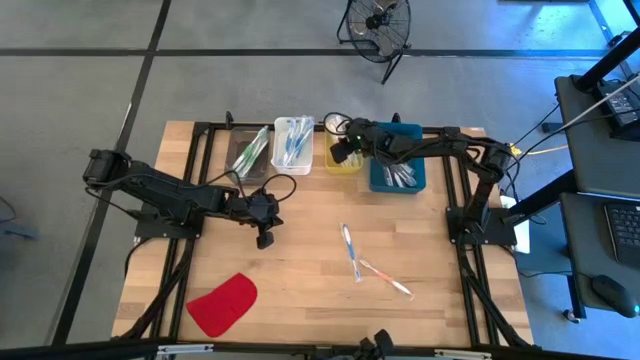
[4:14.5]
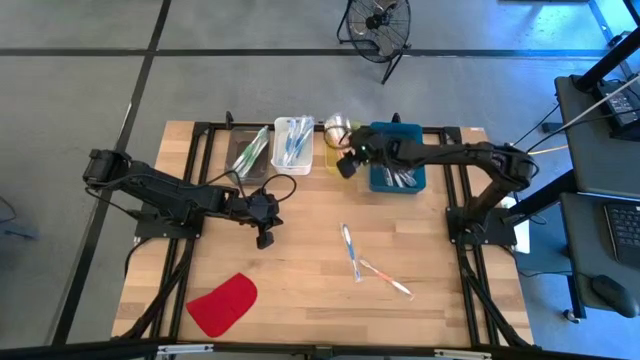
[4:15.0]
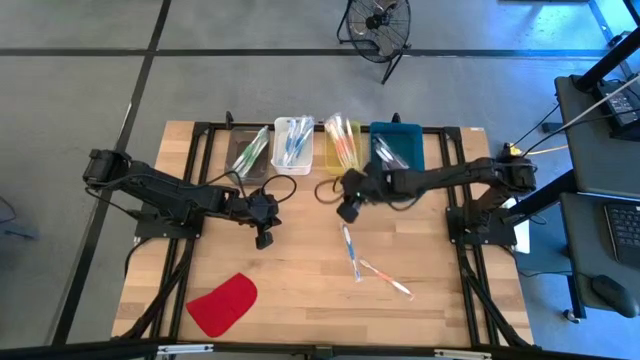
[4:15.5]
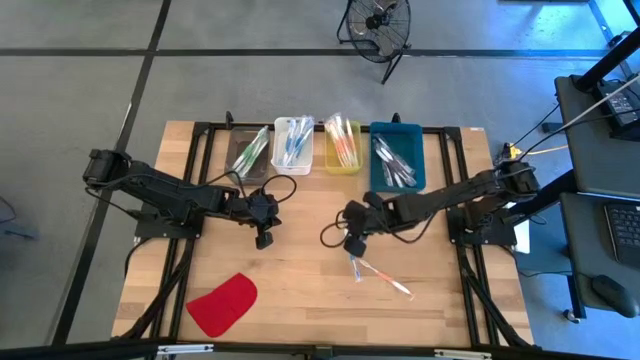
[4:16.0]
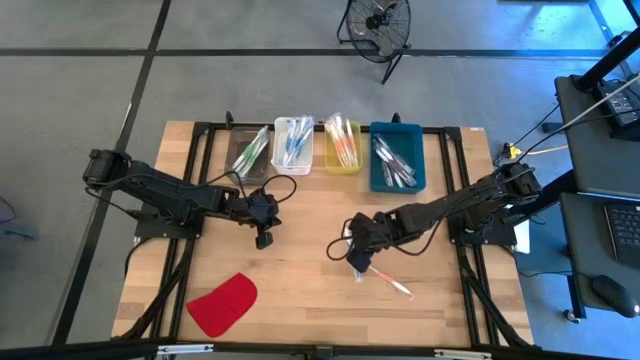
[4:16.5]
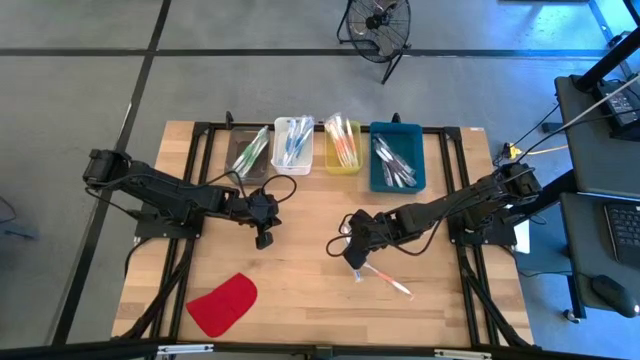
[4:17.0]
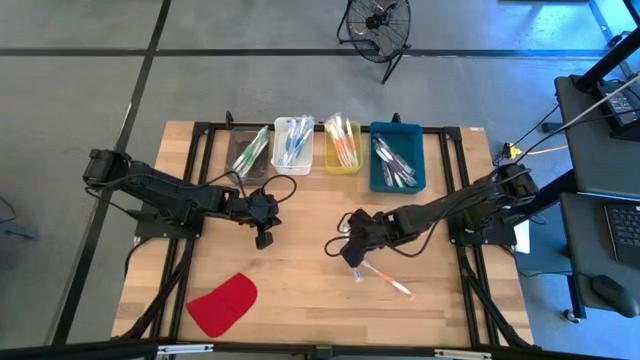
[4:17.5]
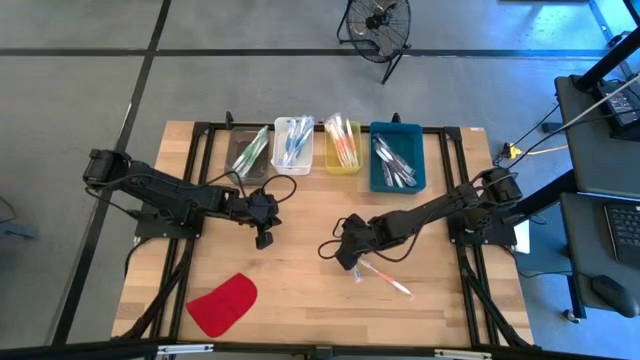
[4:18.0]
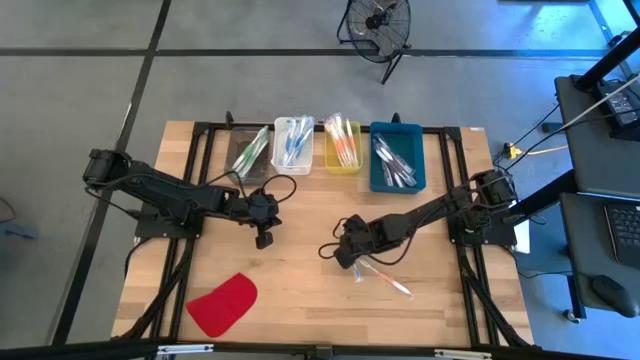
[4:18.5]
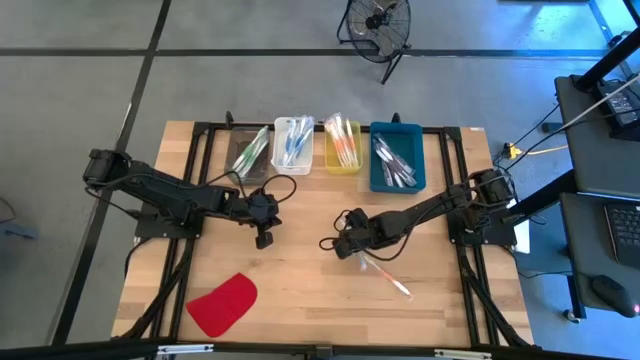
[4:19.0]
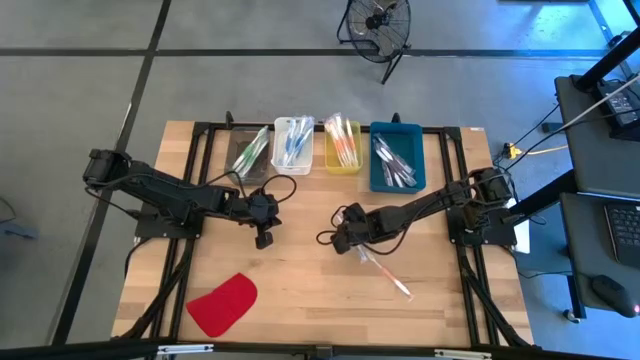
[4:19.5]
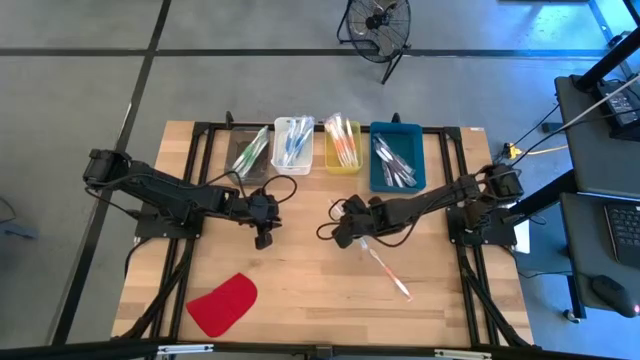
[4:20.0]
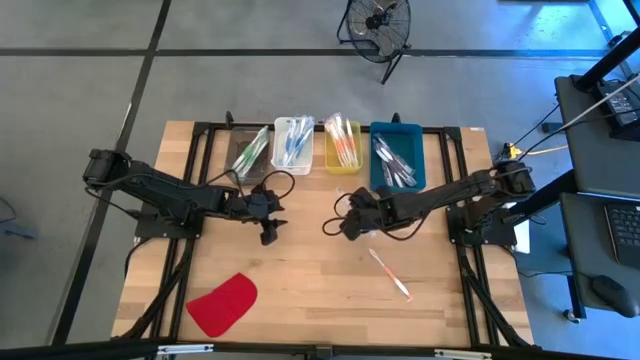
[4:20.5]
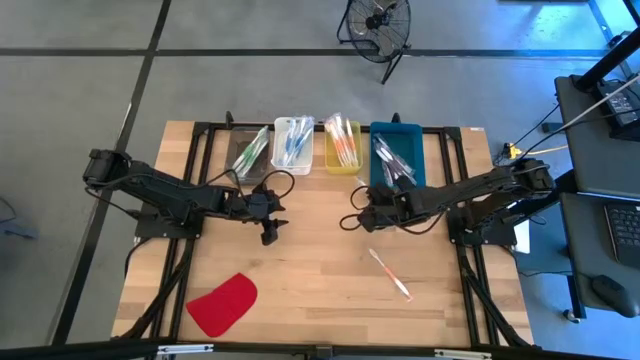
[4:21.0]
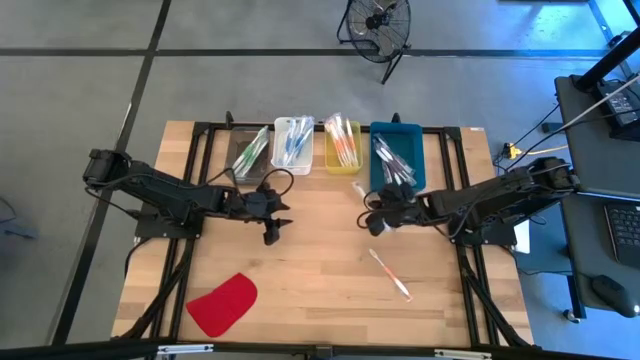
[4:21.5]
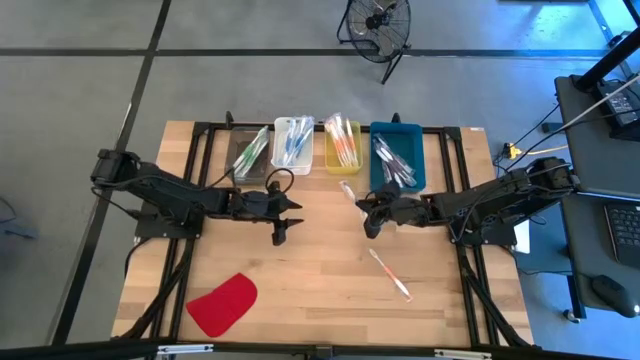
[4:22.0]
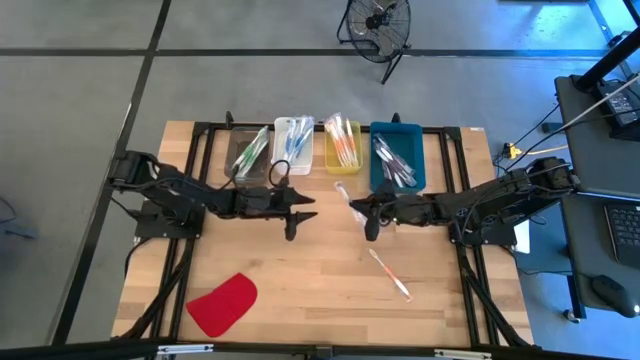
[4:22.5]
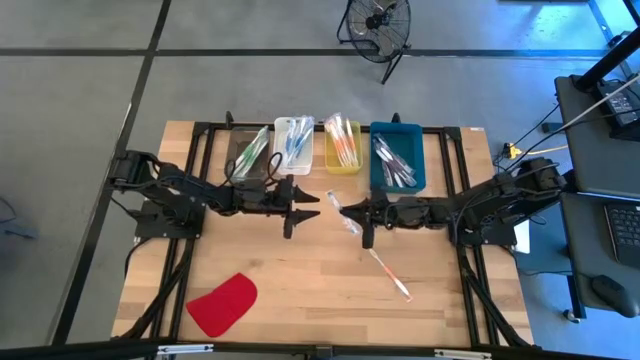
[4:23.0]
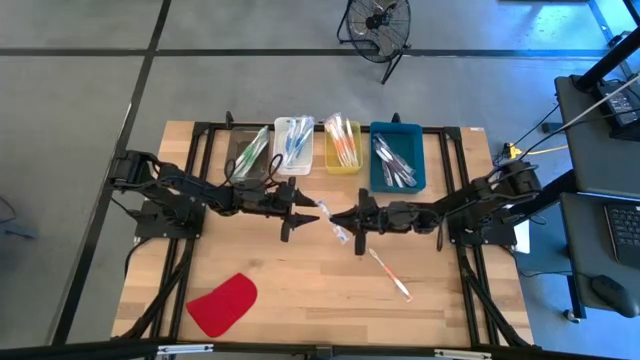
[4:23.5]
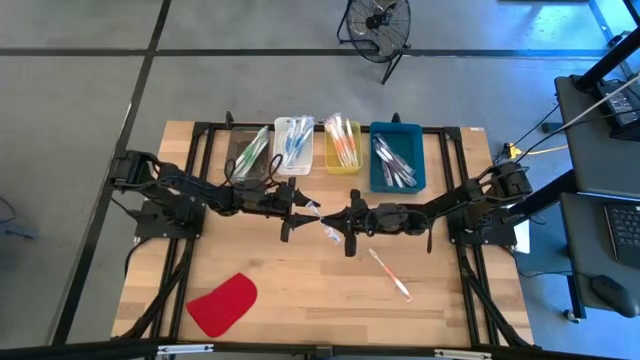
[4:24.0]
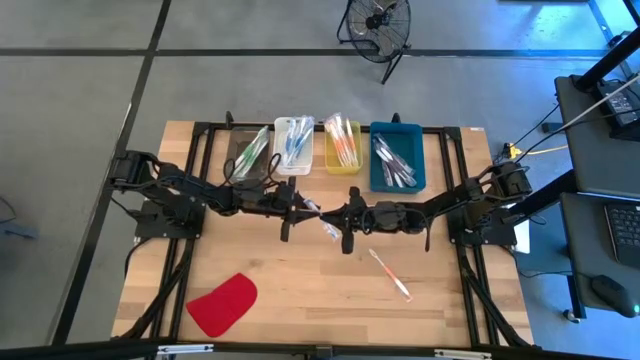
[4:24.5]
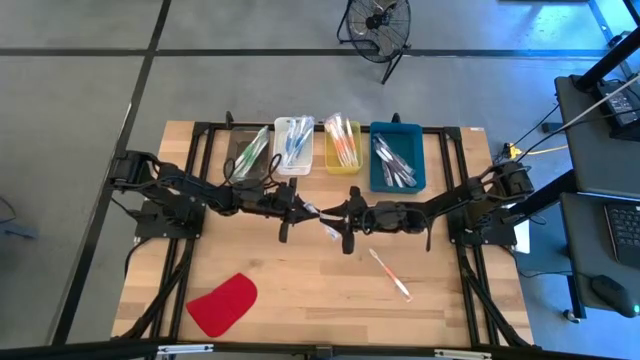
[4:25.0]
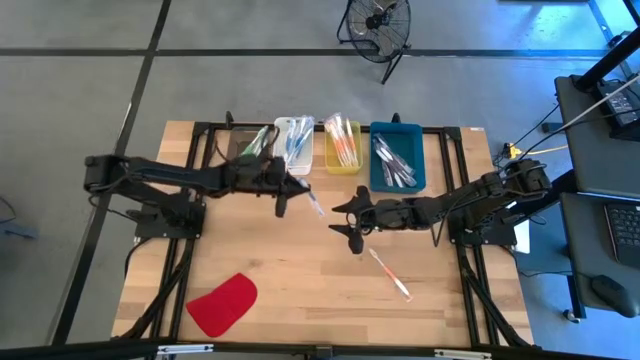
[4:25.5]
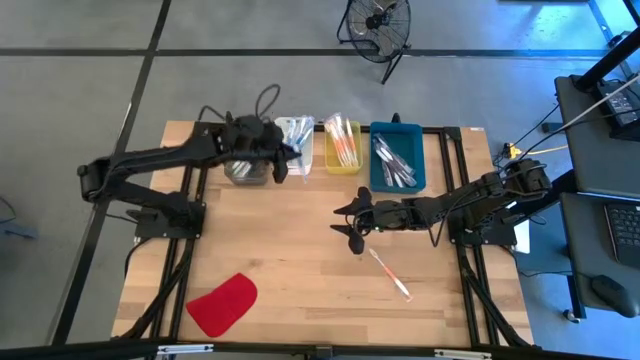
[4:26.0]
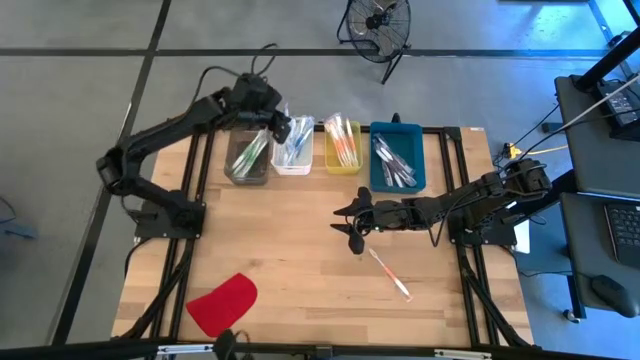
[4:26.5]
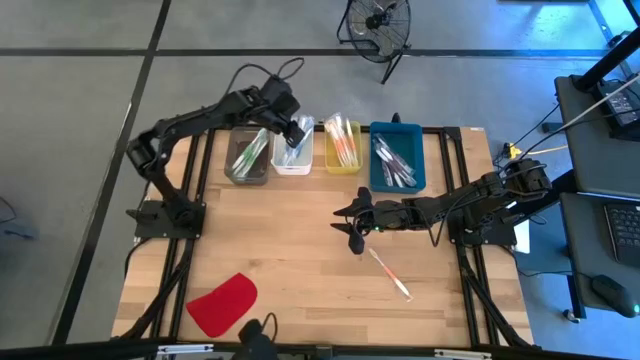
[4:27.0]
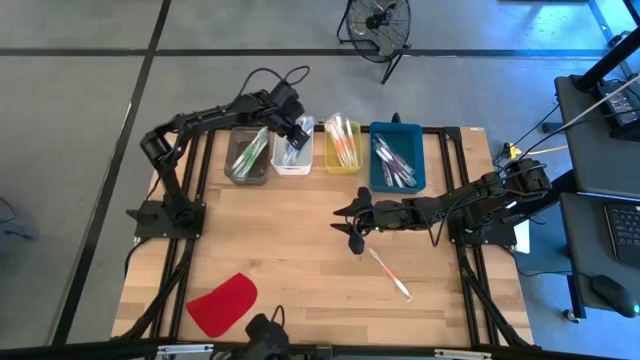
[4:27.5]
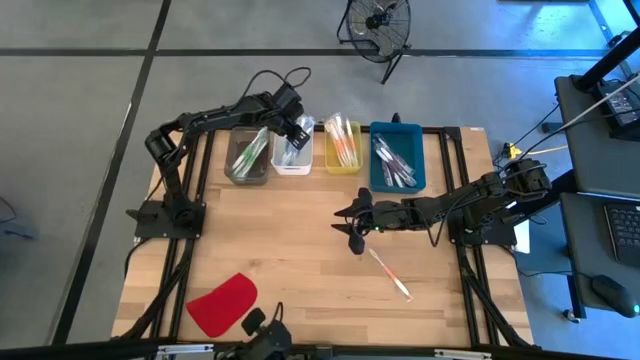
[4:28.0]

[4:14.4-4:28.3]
Task: Pick & Place Toothbrushes
Put the blue toothbrush into the white bin

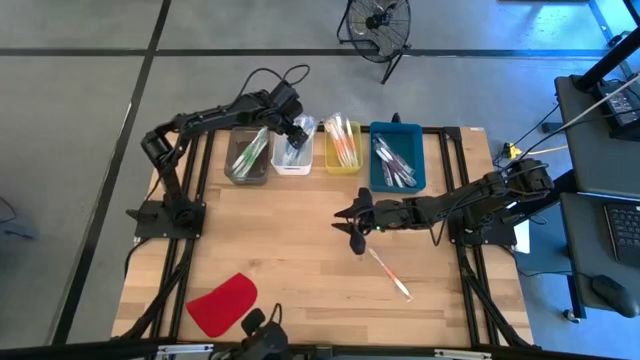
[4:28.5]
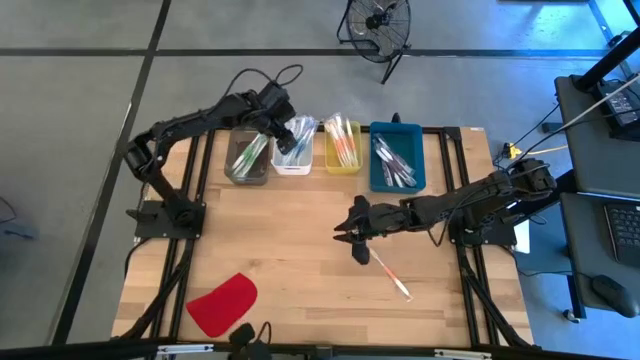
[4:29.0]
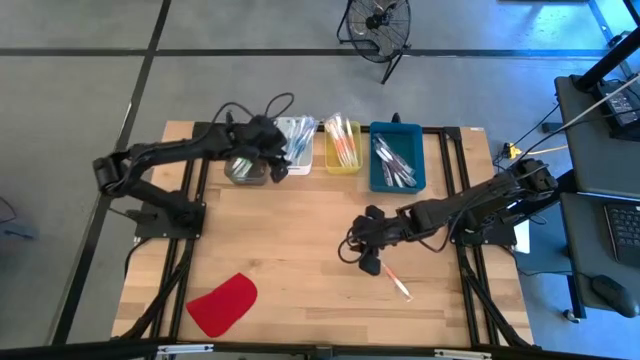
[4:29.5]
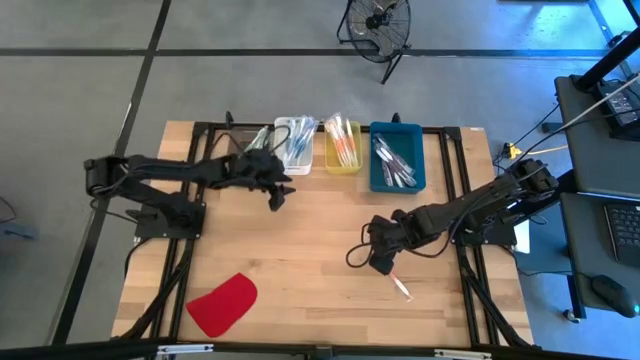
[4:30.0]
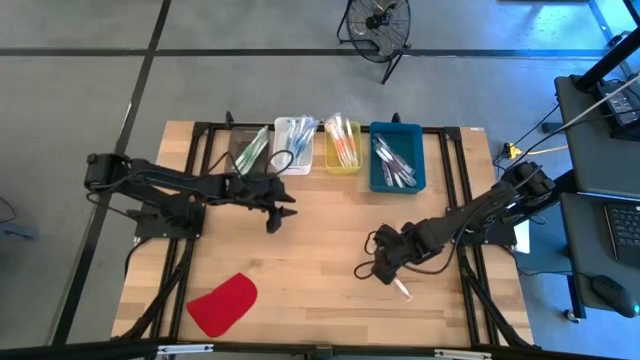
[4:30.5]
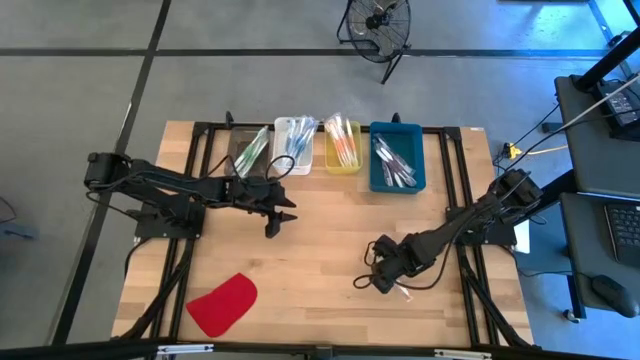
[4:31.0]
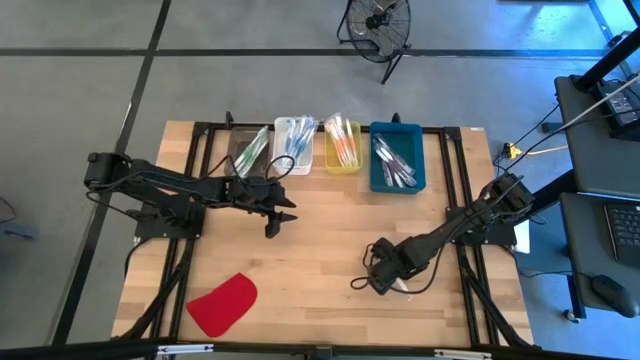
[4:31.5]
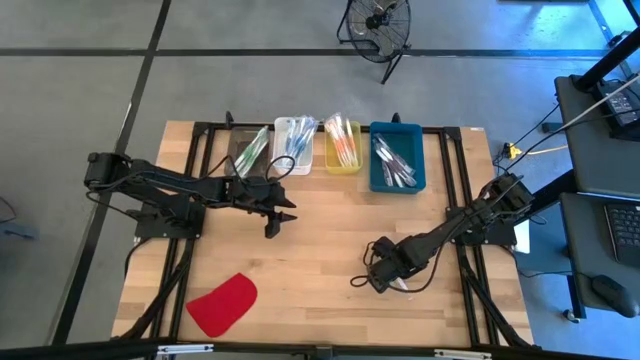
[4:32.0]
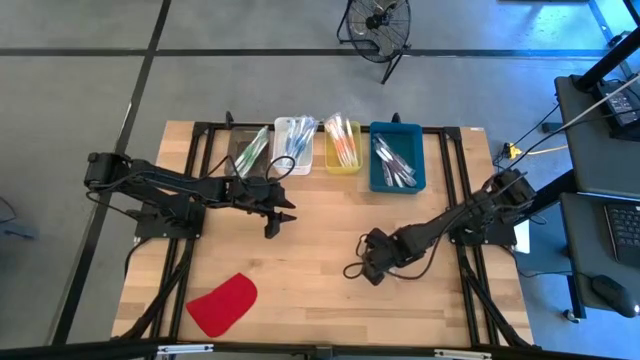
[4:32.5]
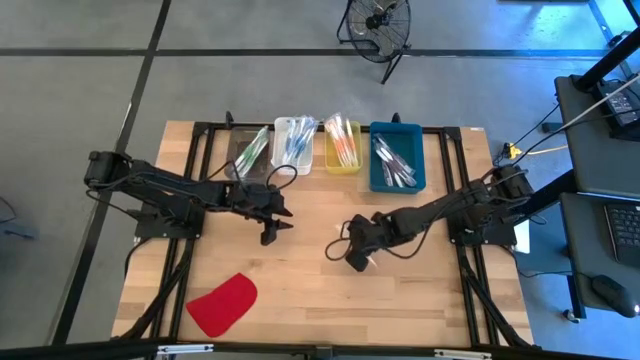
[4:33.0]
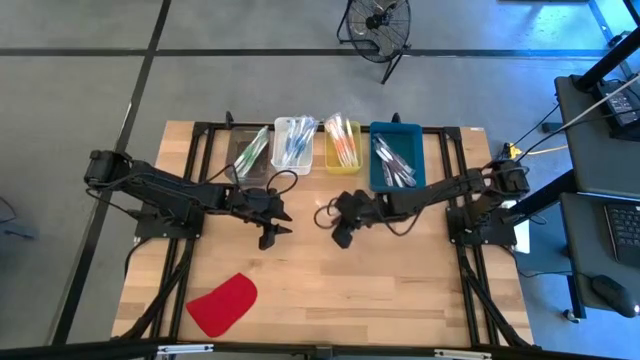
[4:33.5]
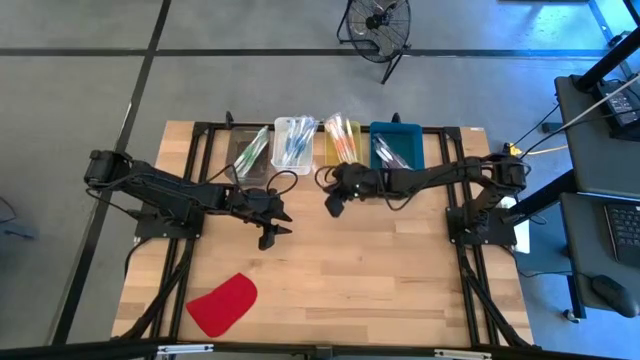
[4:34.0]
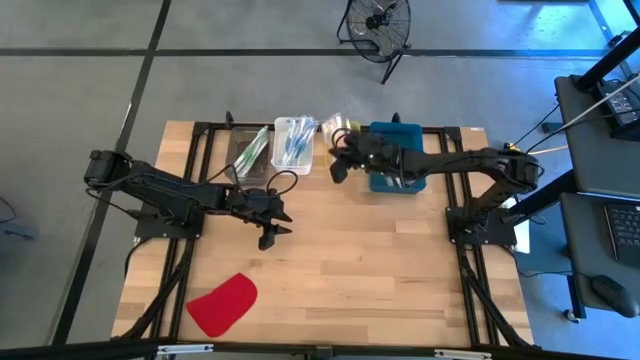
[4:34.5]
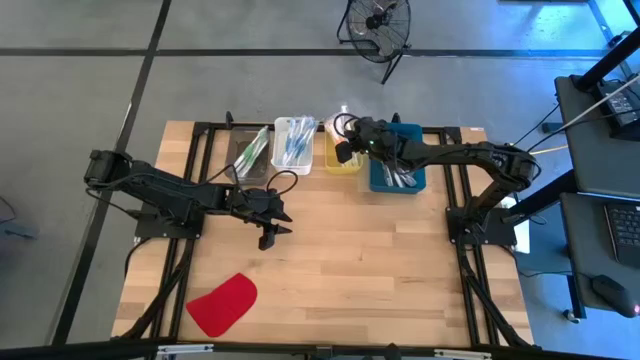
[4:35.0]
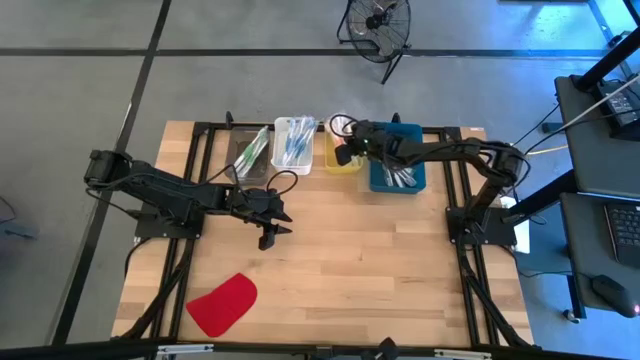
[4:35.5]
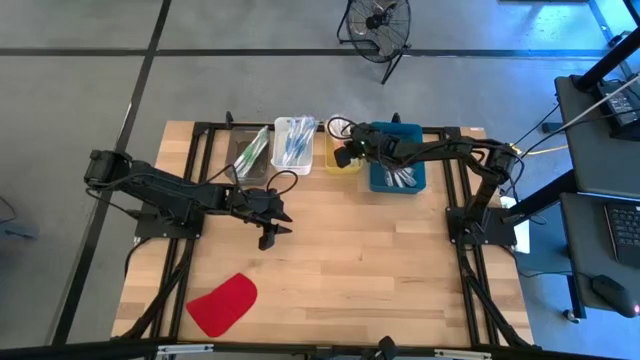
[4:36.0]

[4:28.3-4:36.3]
Put the orange toothbrush into the yellow bin
